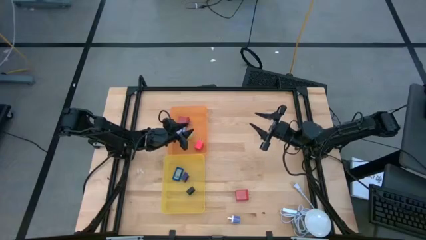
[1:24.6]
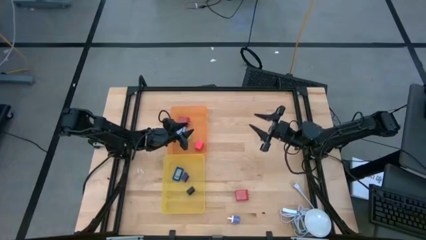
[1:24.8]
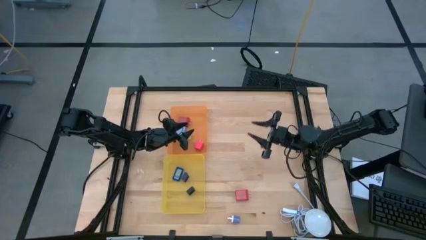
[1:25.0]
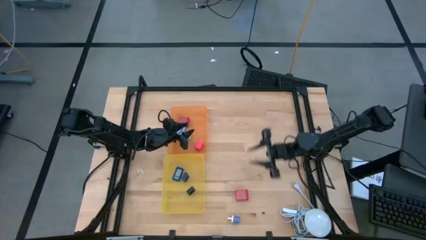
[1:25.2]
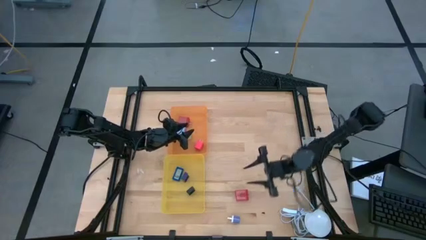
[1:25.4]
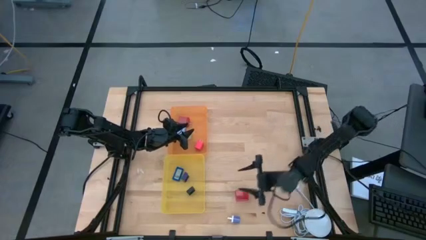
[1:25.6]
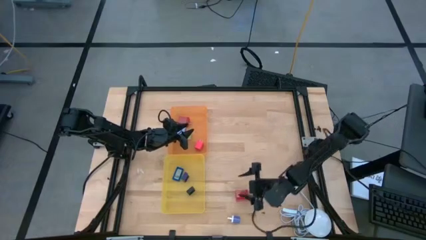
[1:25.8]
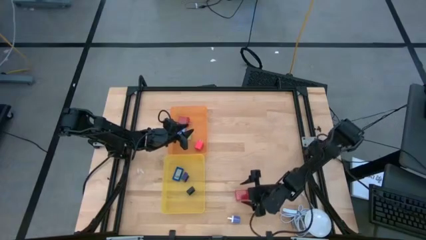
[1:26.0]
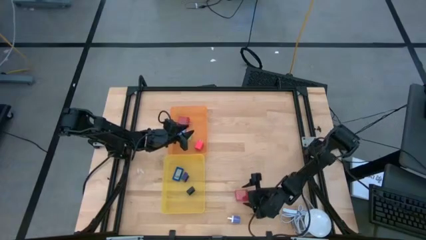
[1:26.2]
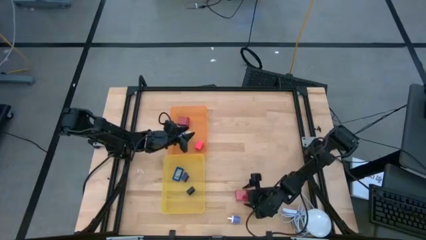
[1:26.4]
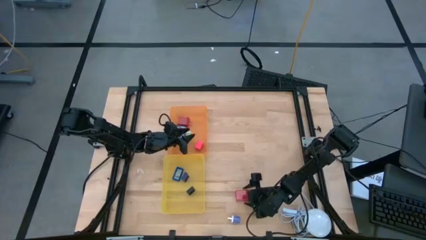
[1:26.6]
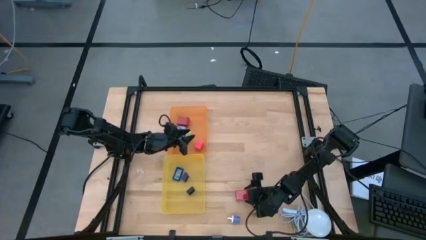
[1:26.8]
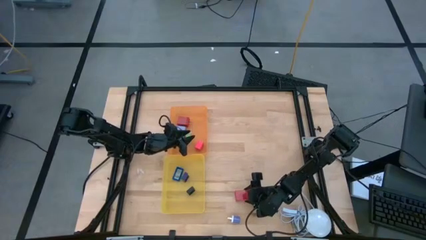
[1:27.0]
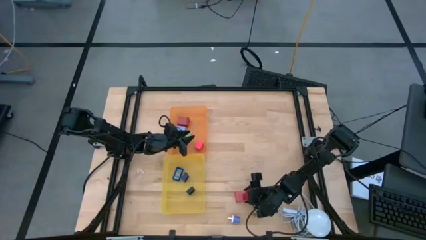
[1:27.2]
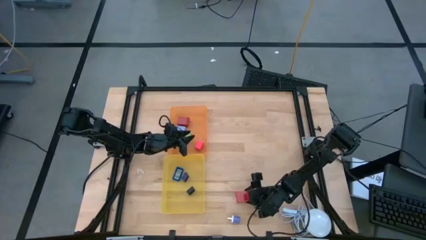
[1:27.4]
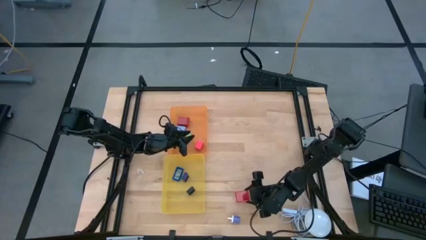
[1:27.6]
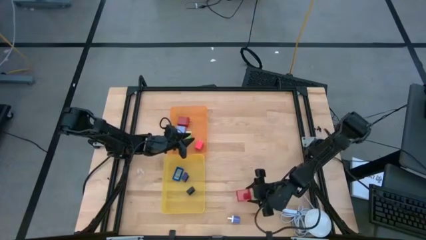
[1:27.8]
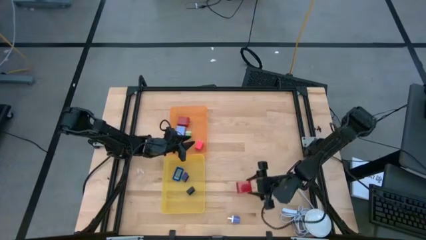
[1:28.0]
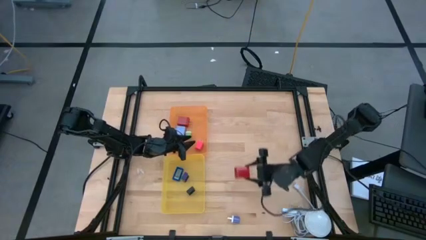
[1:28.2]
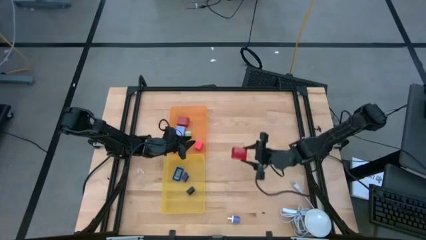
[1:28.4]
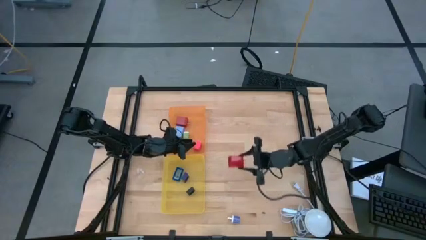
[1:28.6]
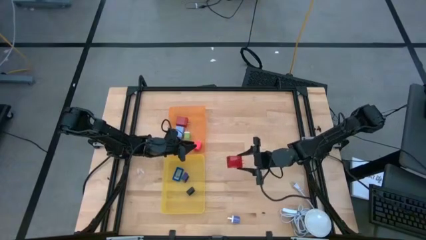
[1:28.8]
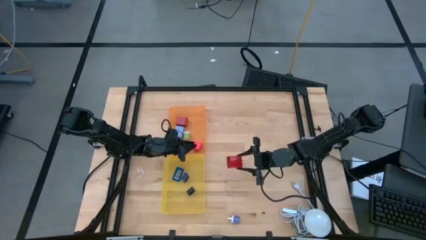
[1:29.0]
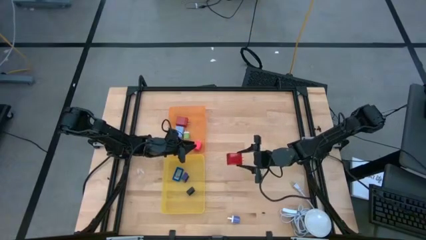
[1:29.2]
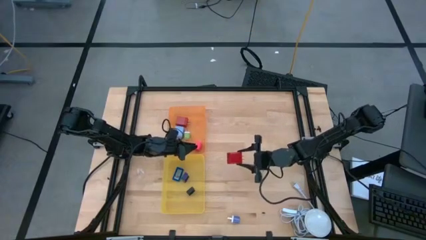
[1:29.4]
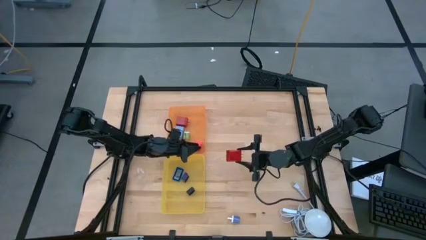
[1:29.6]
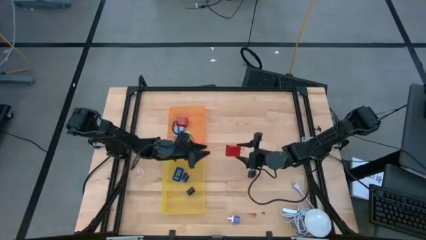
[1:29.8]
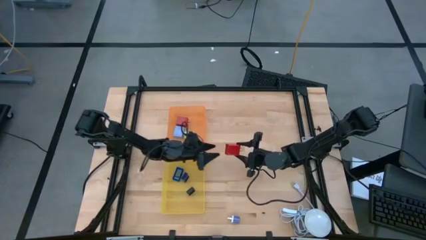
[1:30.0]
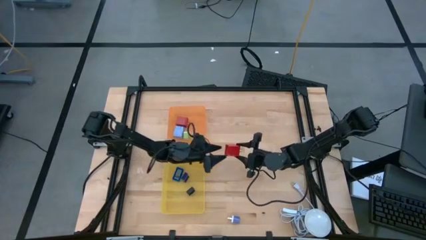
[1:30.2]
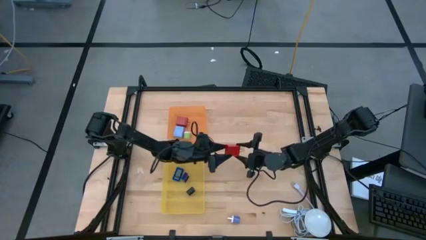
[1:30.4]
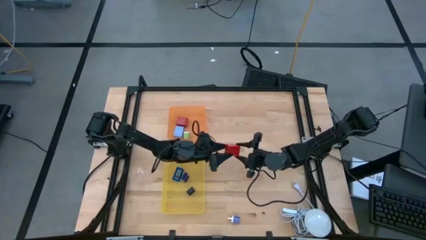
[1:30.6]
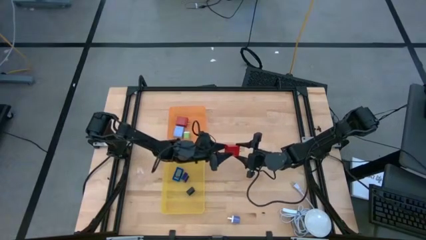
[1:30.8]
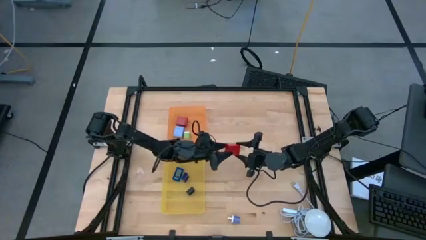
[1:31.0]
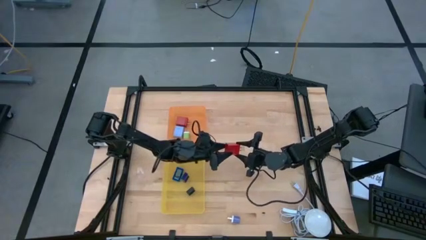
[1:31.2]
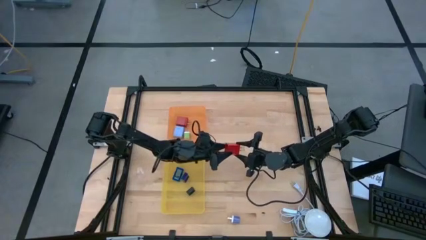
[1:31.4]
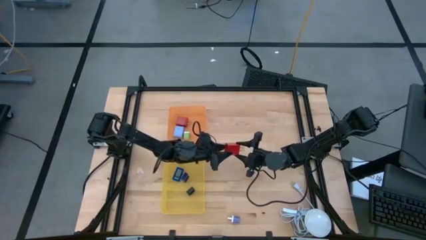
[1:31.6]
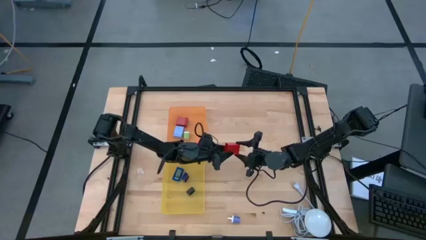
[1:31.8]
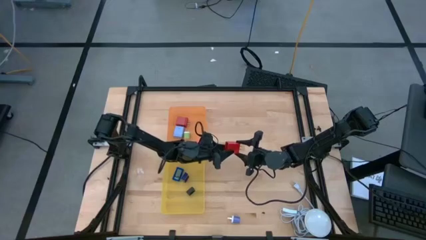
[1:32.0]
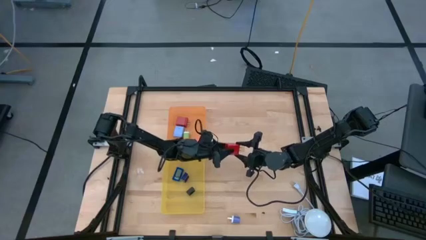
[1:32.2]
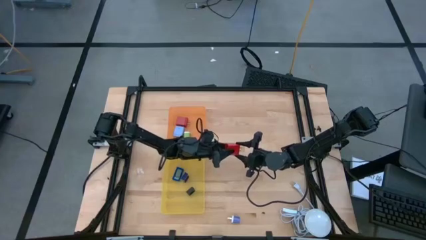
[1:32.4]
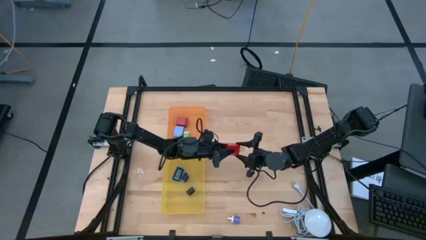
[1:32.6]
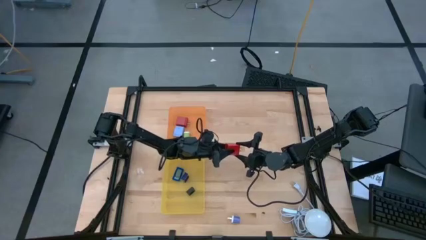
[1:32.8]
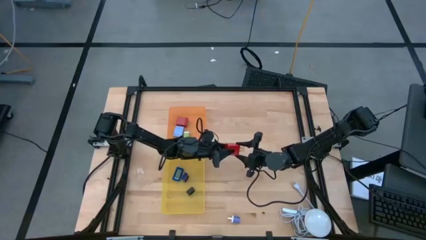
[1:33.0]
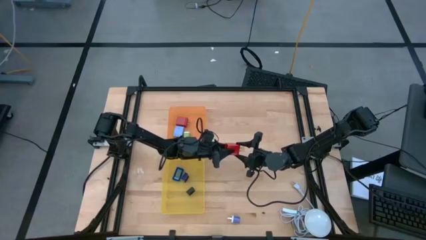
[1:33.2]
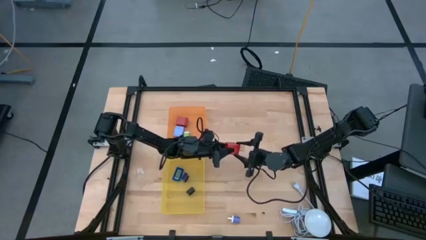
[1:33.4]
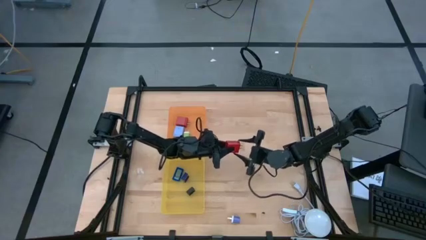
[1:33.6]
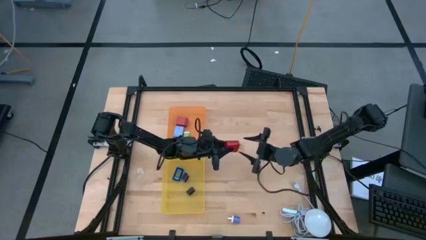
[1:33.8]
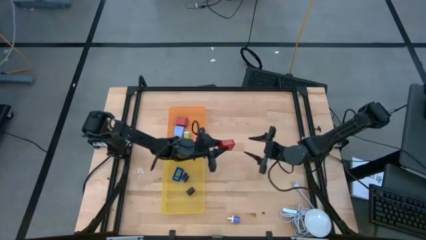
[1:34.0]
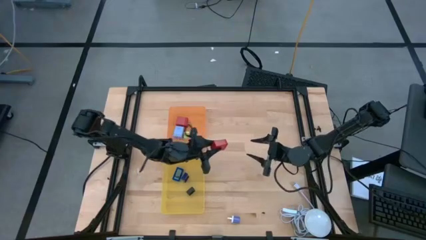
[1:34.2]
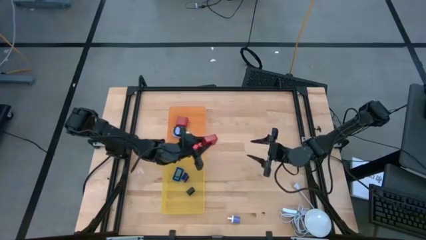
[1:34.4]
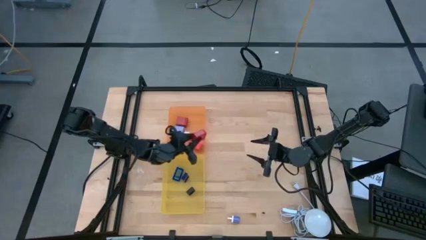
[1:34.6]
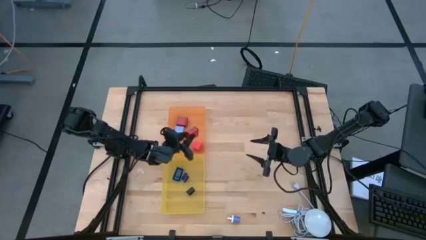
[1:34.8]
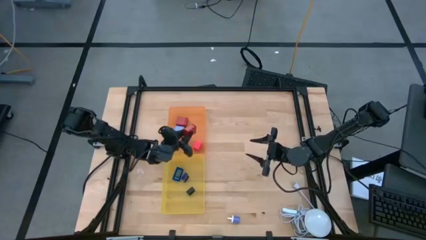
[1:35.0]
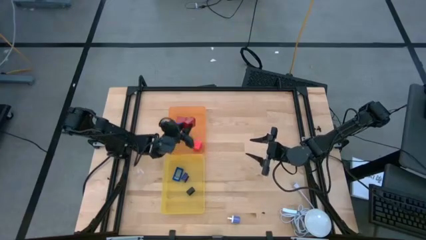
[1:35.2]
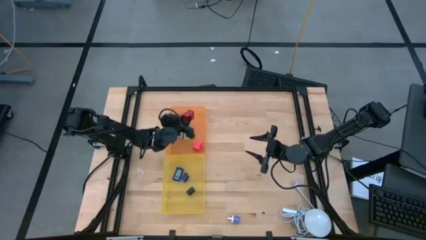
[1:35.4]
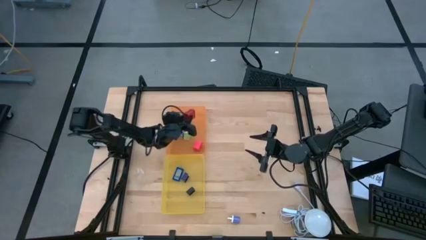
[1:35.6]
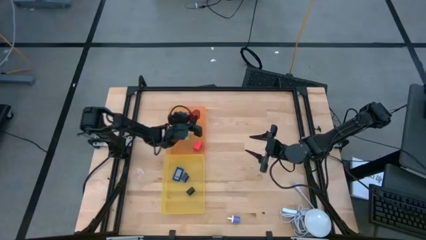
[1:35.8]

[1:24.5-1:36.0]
Task: Sort adapters and digital timers
Put the red adapter into the orange bin

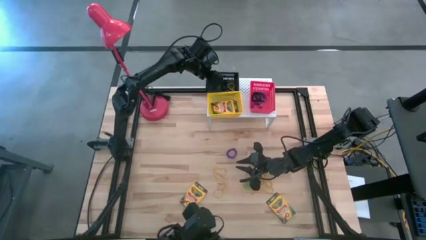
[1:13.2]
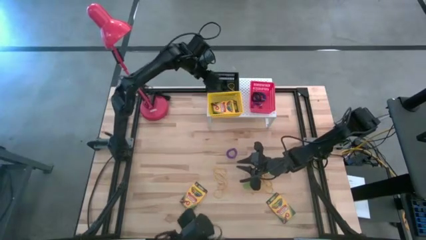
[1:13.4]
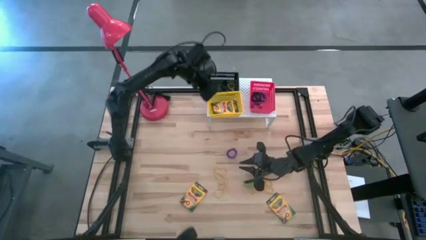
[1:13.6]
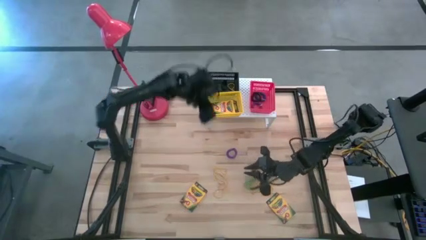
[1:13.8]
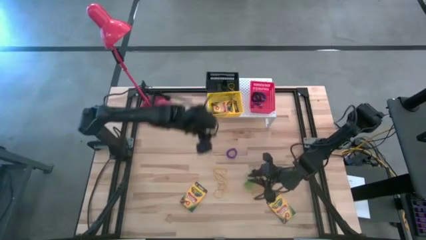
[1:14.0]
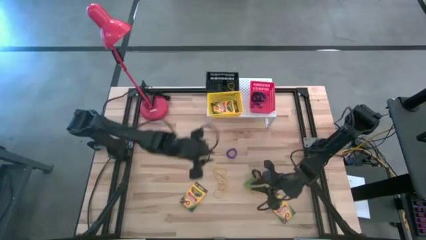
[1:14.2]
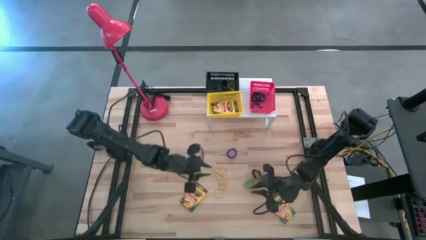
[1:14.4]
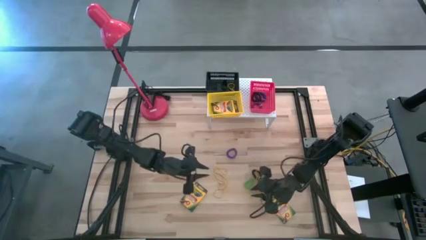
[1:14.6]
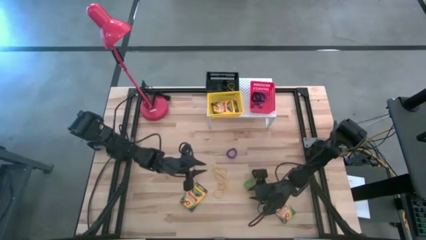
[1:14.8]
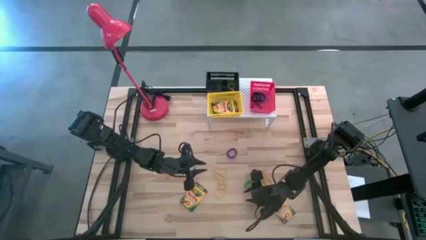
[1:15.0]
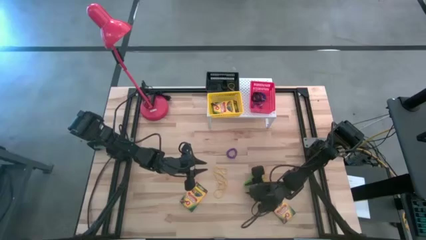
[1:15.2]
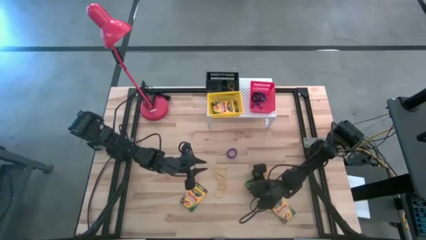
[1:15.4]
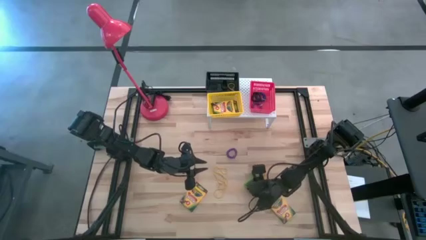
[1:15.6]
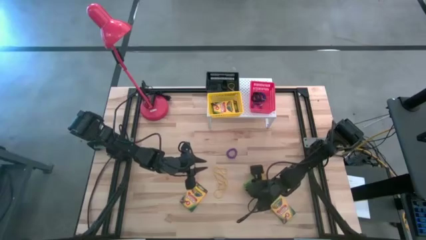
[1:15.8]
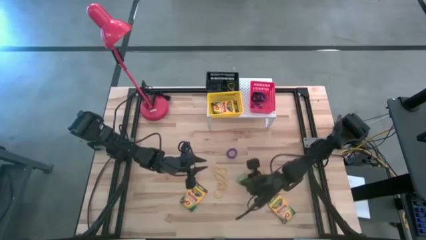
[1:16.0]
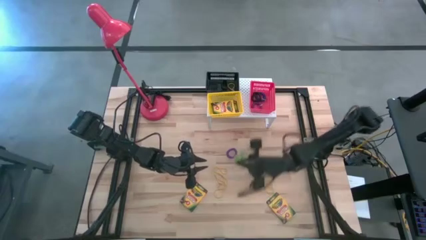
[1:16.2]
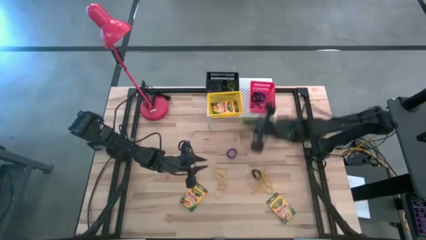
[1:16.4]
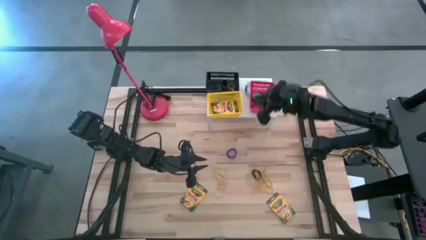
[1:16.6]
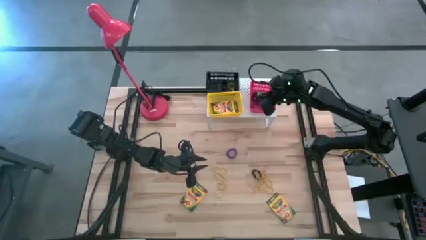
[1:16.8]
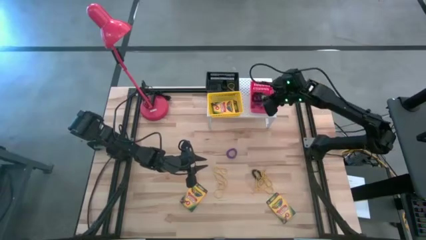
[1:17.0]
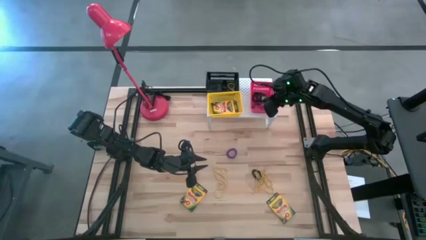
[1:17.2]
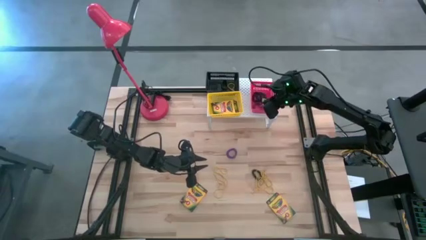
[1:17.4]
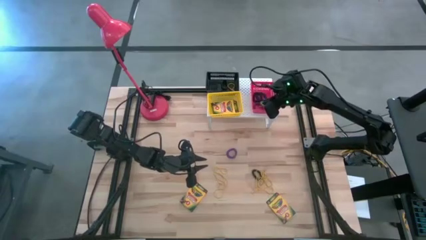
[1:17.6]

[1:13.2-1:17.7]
Task: Pick & Place Office Desk Supplies
Put the green spring keychain into the red bin on the shelf
